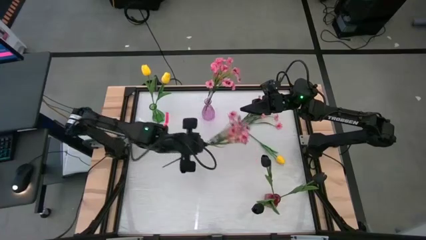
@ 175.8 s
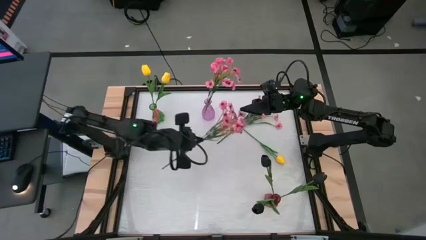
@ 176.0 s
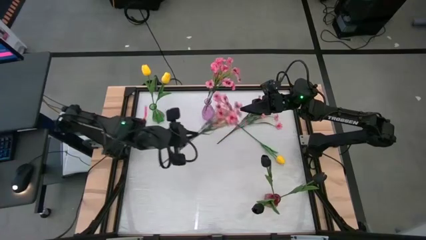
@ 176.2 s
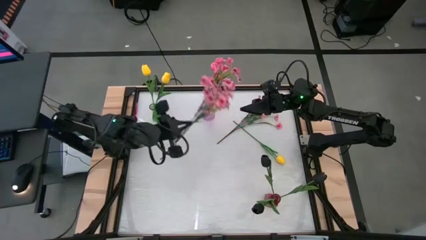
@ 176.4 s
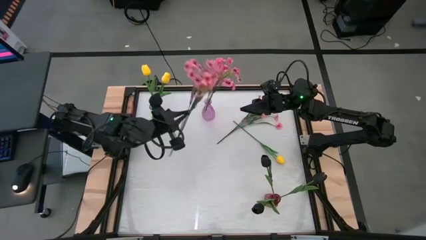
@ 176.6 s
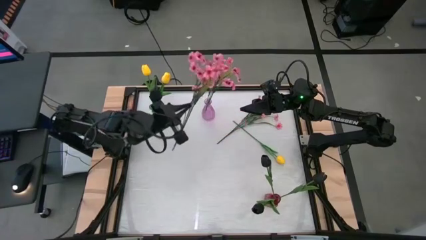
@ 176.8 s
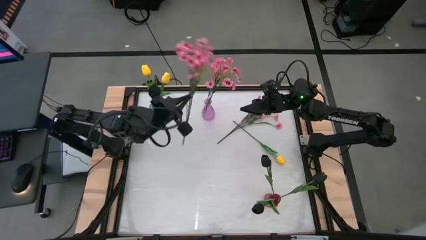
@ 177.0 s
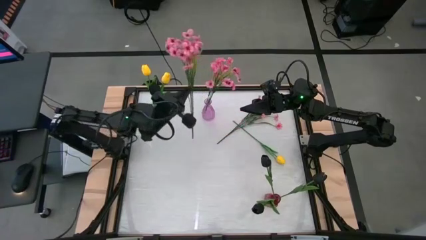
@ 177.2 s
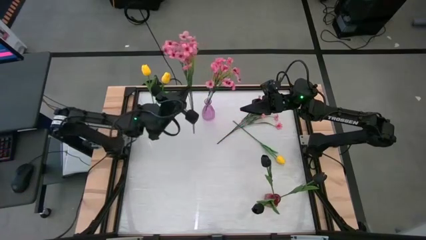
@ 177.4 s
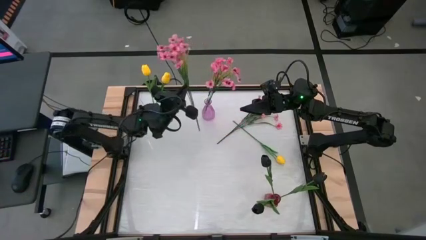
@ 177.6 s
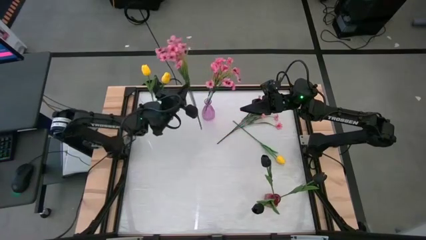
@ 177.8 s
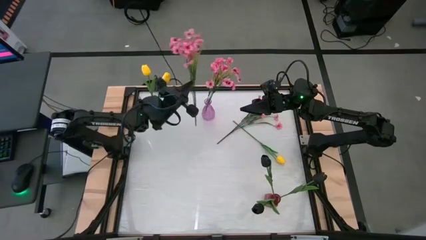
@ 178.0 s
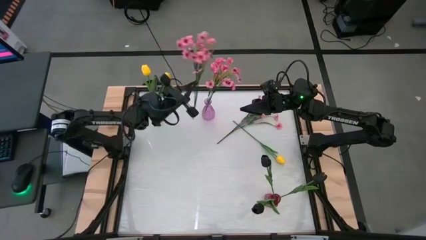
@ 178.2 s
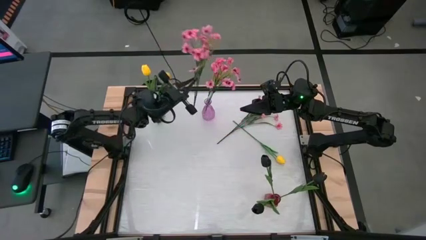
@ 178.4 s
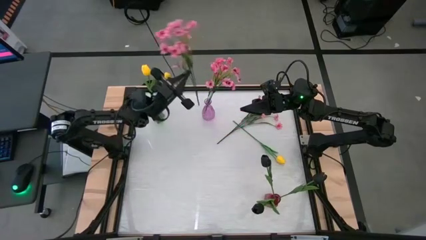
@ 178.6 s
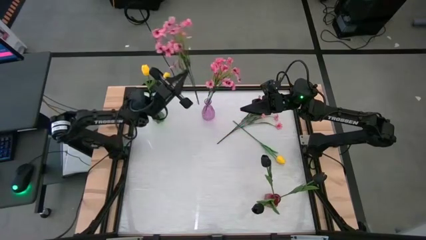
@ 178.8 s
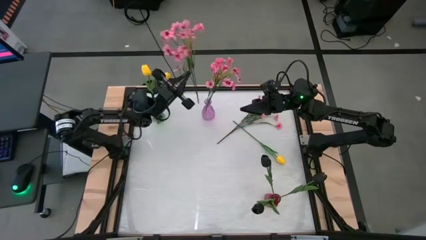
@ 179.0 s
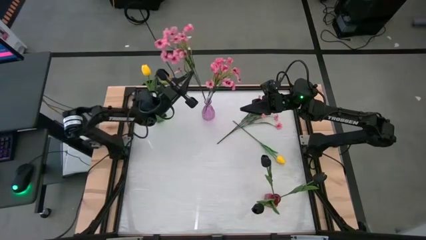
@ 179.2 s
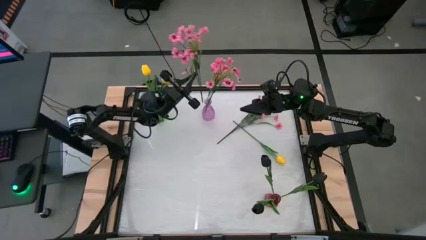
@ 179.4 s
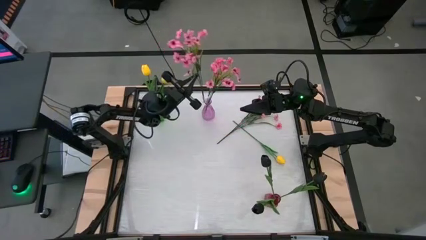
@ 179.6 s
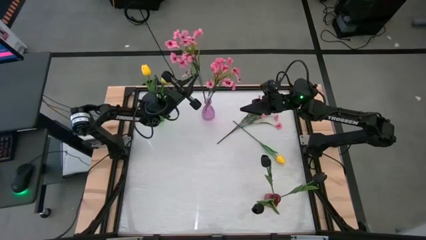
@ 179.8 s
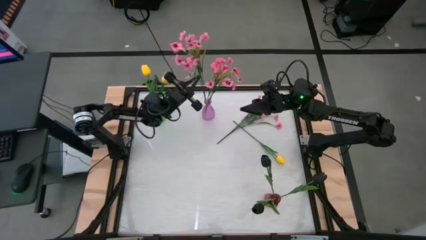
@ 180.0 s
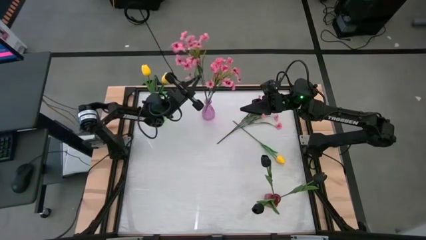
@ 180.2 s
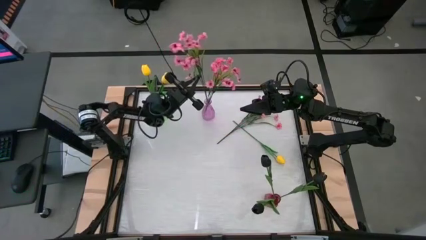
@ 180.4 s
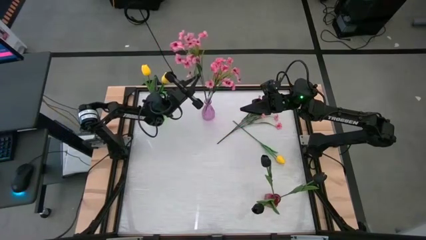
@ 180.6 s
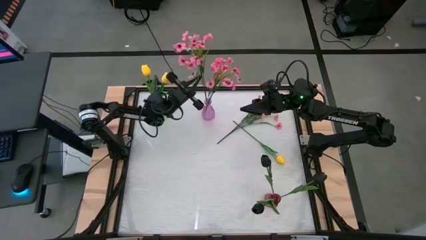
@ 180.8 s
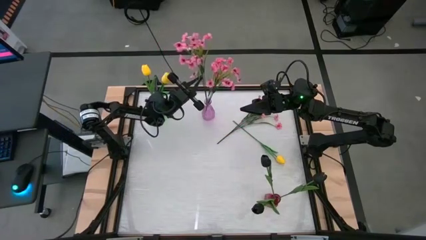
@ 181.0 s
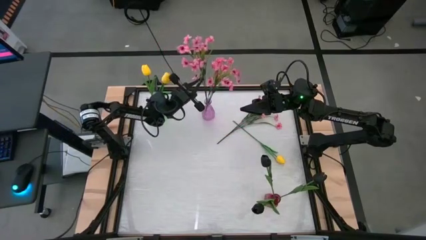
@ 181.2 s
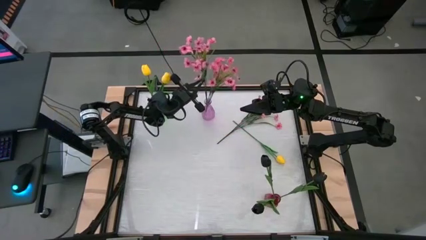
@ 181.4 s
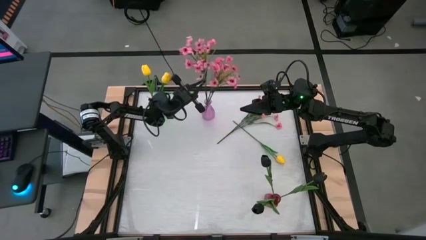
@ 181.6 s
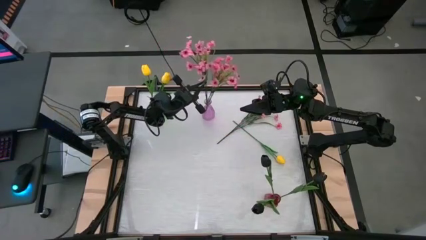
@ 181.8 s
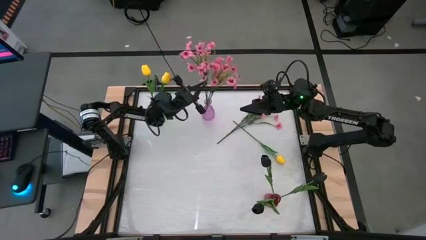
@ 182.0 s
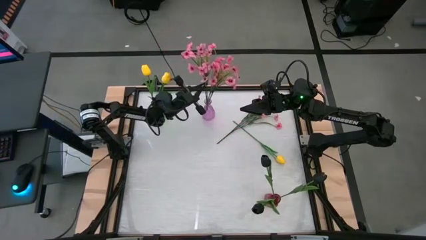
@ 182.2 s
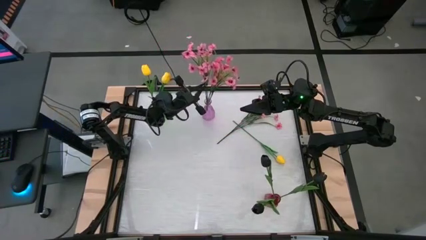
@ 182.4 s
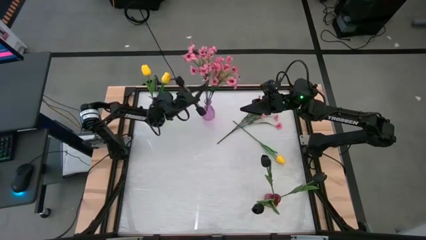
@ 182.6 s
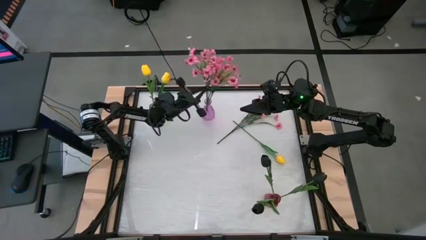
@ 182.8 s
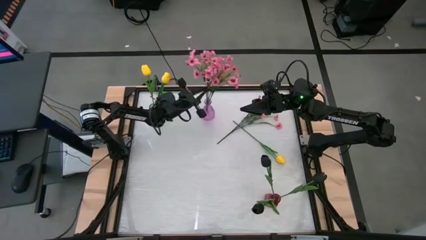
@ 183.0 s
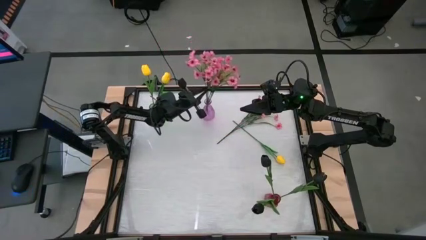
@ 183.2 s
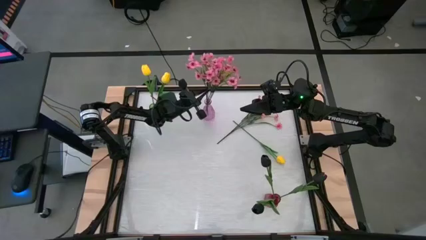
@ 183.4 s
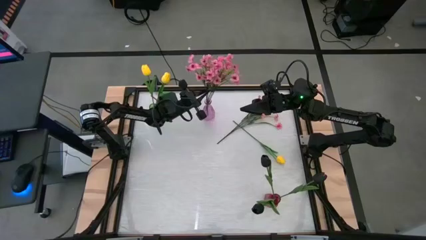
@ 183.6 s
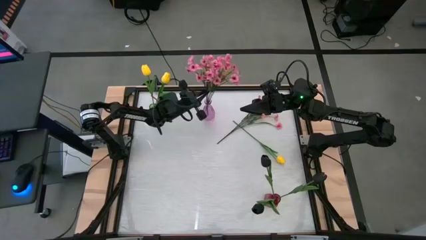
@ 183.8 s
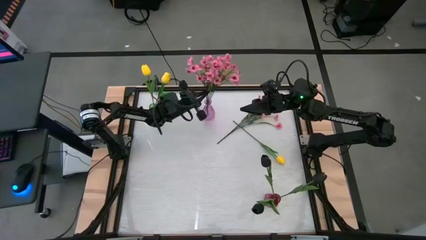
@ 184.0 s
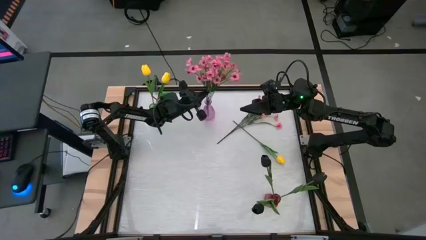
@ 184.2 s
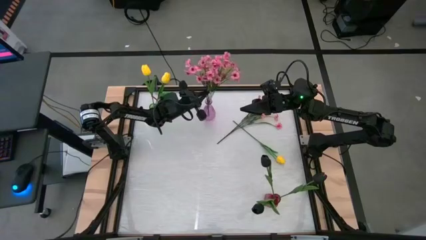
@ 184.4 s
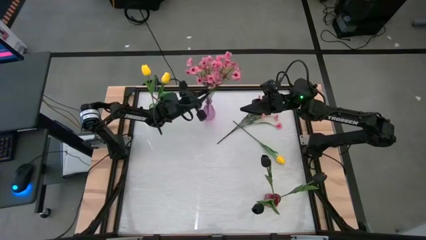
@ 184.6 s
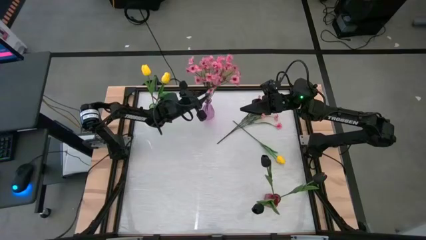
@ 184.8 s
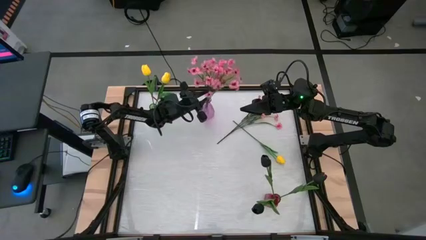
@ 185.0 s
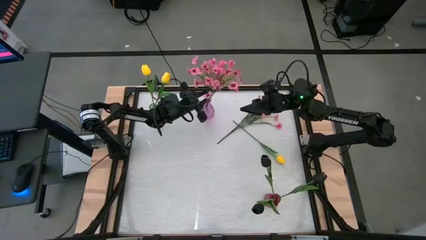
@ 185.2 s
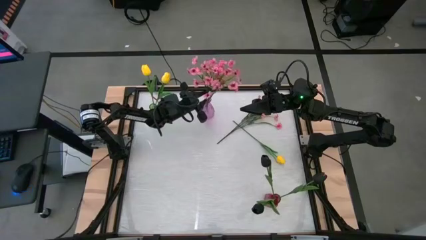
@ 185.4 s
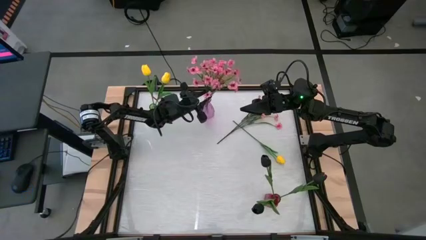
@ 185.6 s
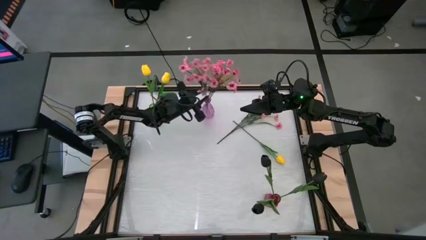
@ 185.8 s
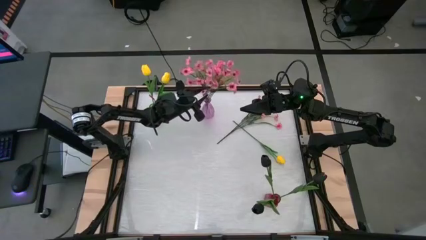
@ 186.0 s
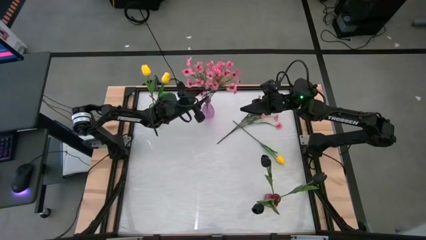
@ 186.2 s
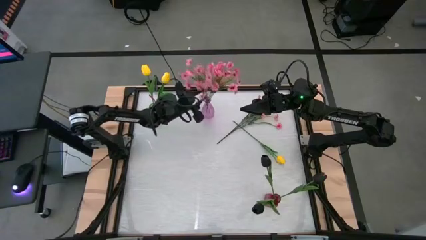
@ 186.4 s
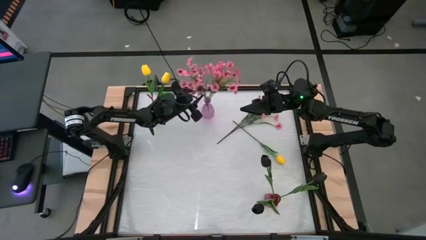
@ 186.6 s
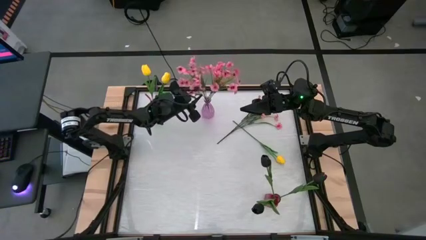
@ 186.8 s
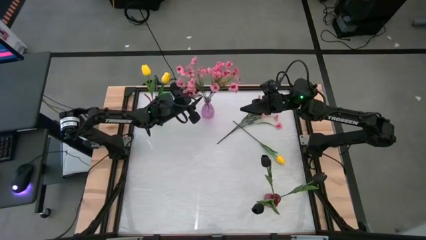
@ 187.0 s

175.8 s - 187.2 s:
Task: Sort flowers into vase by color
Put the bottom pink flower into the purple vase

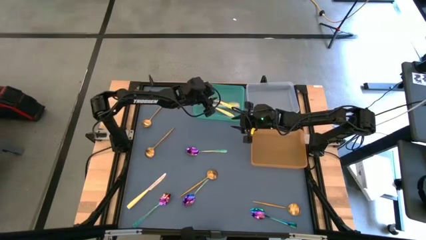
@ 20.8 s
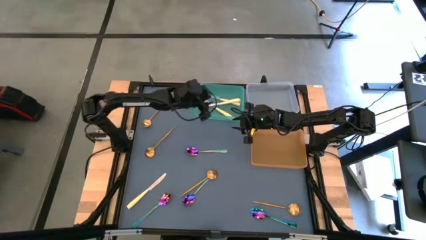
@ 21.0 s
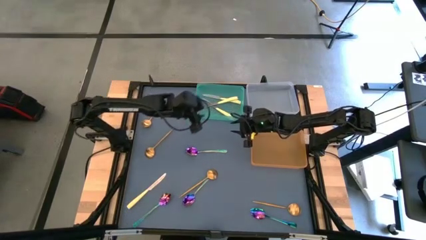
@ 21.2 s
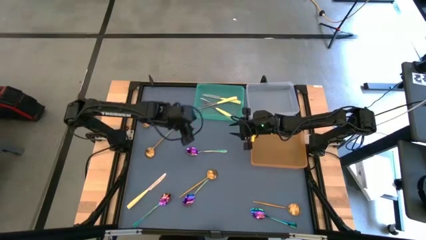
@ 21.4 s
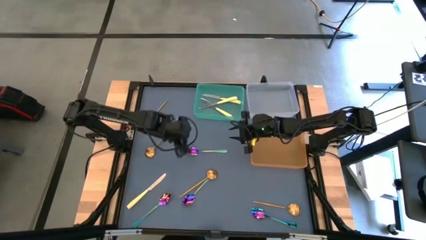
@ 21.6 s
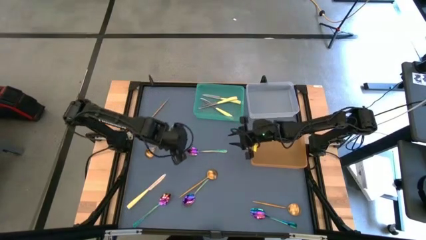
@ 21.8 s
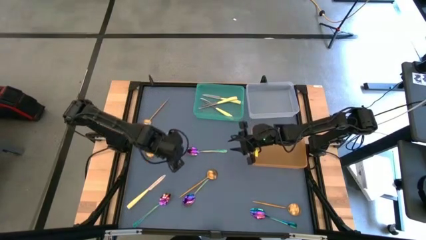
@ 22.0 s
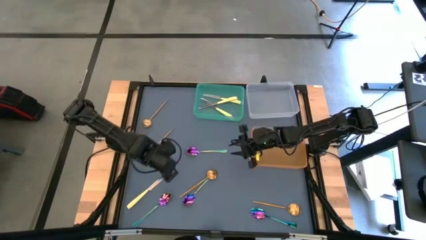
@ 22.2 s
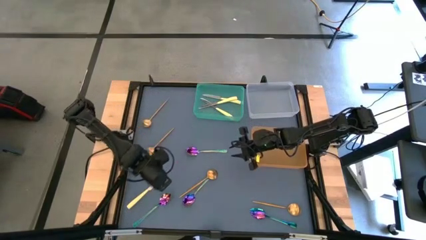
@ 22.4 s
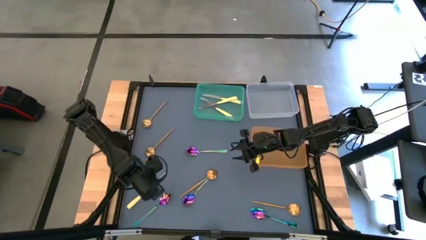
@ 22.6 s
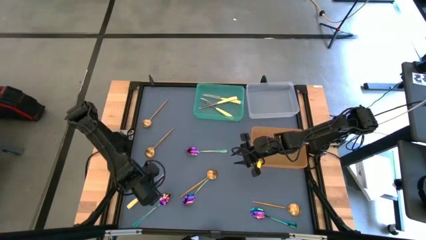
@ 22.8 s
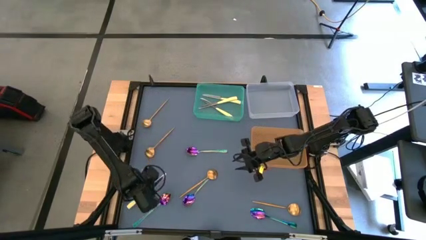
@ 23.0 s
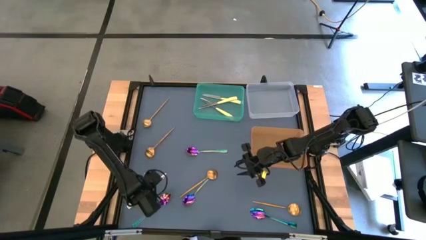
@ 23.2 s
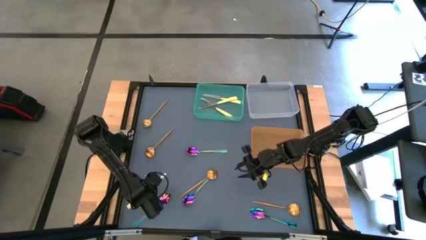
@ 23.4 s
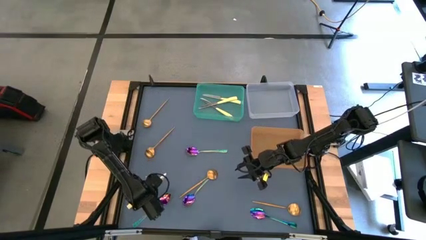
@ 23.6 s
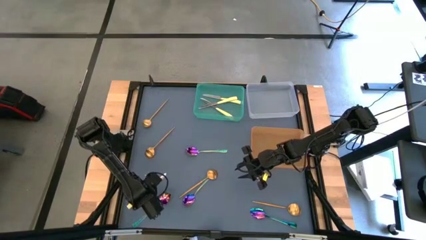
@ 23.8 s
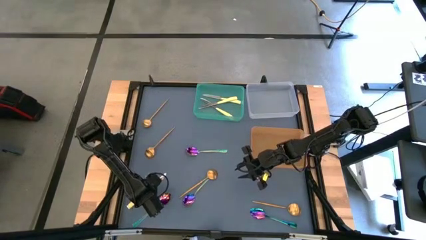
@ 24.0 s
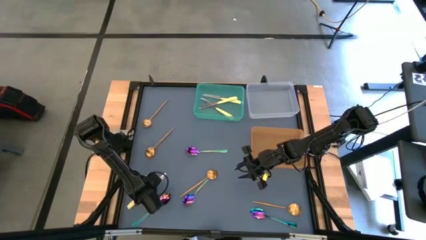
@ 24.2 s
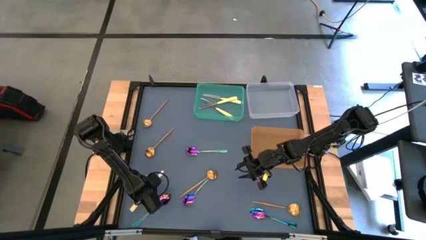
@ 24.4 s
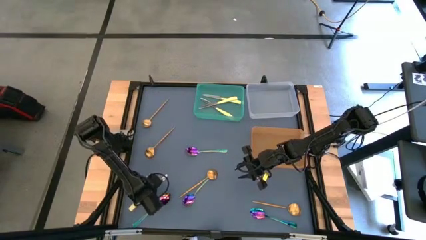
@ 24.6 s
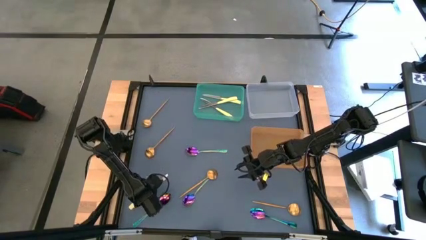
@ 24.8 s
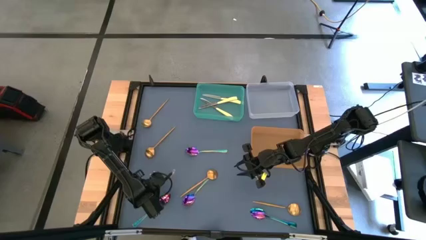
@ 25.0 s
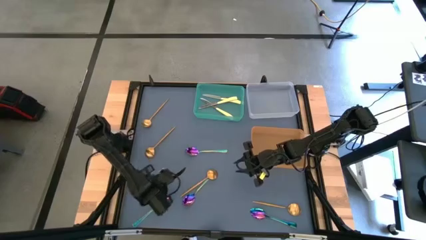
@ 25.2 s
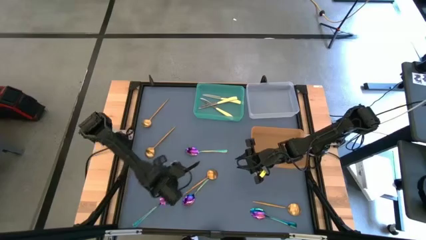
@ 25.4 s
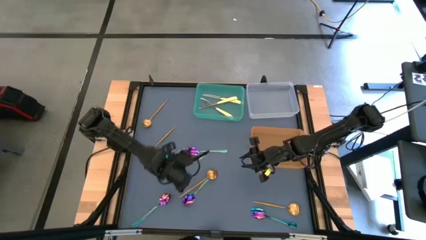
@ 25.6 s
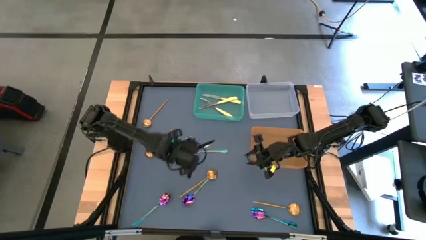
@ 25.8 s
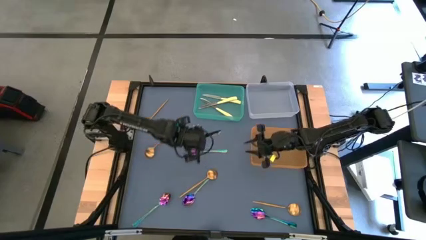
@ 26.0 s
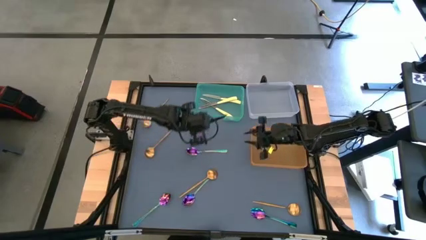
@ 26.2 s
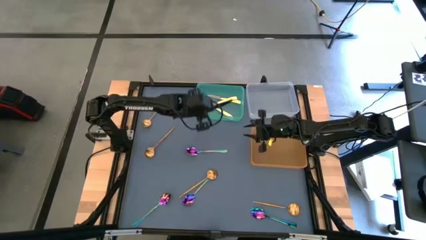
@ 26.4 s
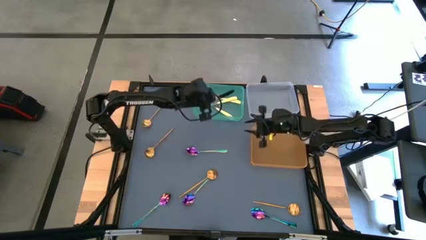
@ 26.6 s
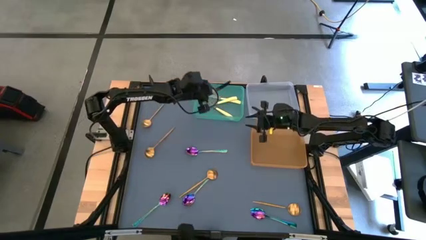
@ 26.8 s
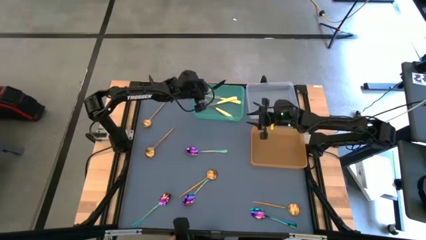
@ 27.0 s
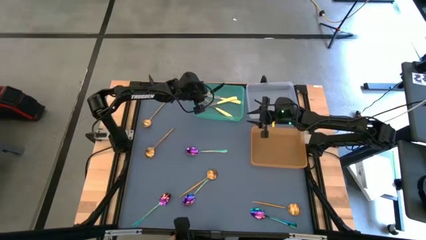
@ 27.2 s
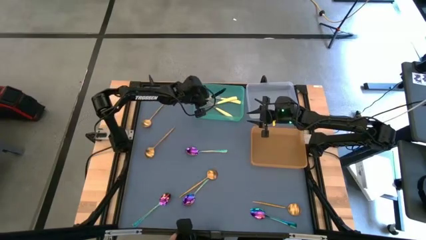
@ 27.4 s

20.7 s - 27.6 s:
Task: Sort silverware by color (type)
Put the yellow table knife into the green bin
